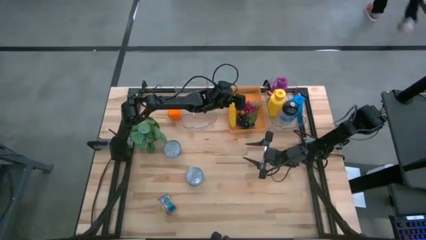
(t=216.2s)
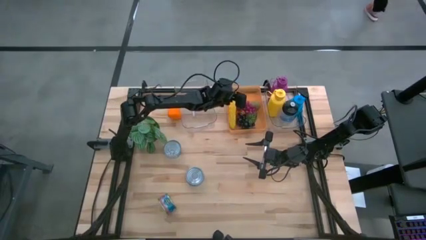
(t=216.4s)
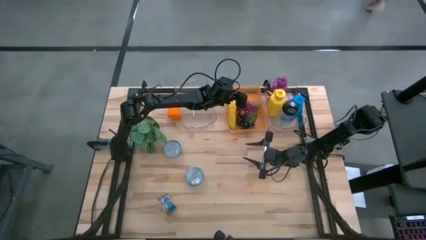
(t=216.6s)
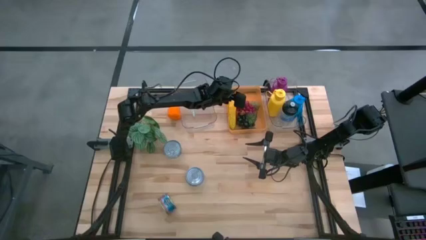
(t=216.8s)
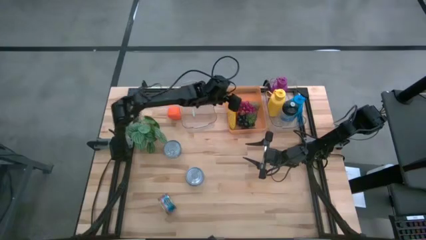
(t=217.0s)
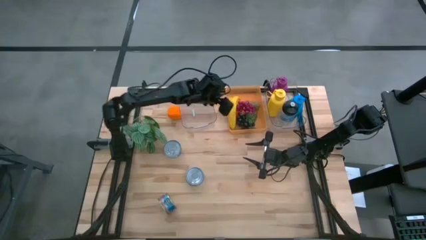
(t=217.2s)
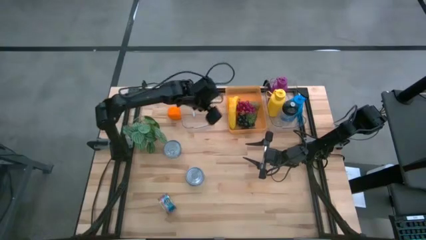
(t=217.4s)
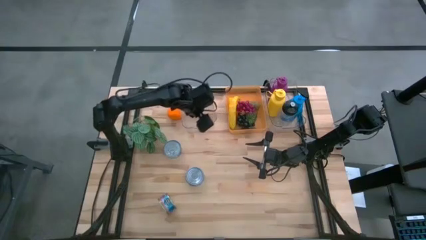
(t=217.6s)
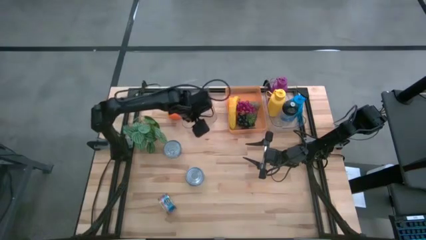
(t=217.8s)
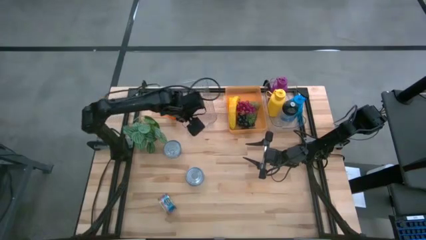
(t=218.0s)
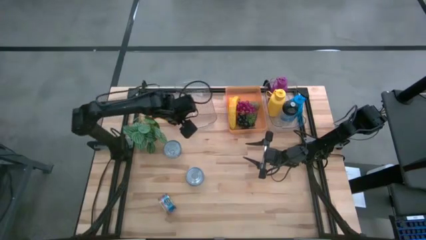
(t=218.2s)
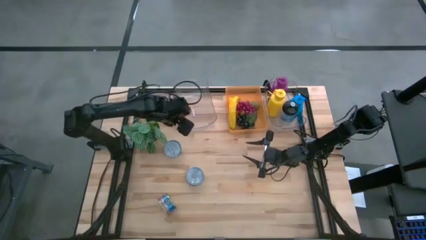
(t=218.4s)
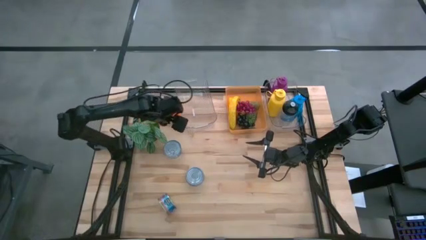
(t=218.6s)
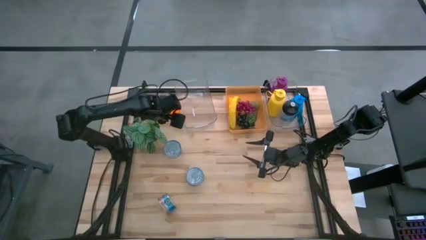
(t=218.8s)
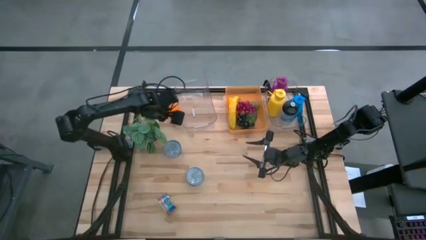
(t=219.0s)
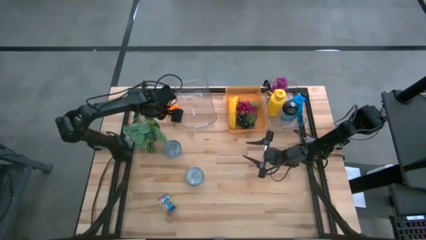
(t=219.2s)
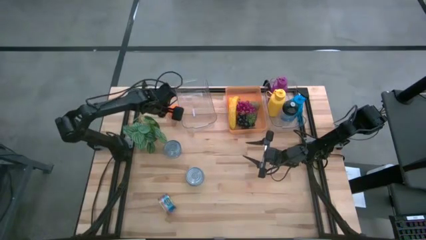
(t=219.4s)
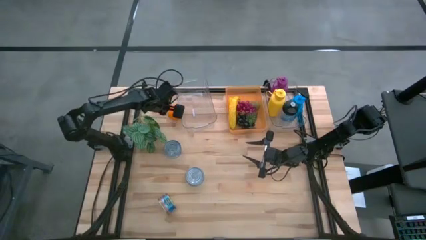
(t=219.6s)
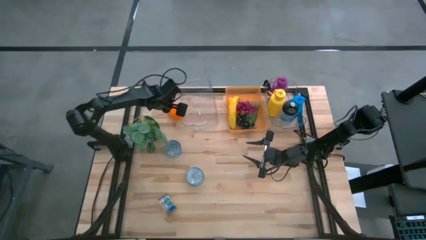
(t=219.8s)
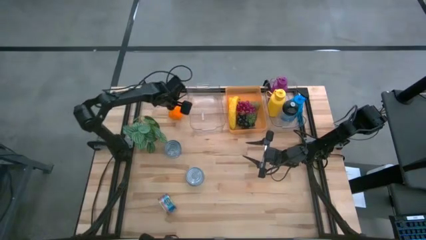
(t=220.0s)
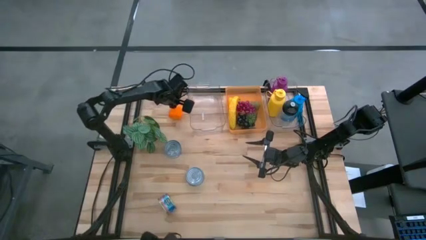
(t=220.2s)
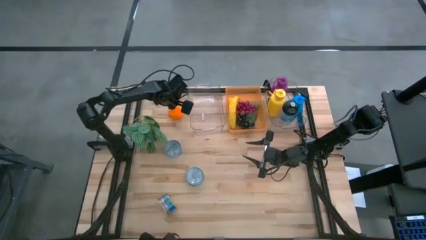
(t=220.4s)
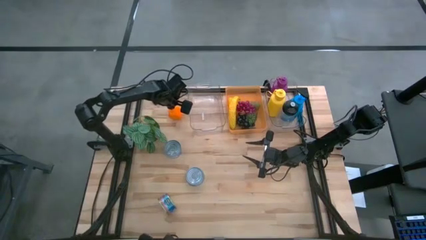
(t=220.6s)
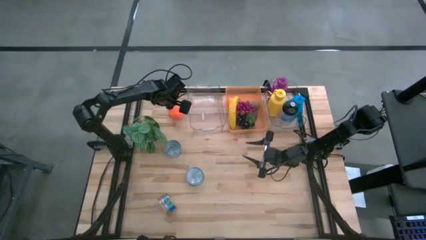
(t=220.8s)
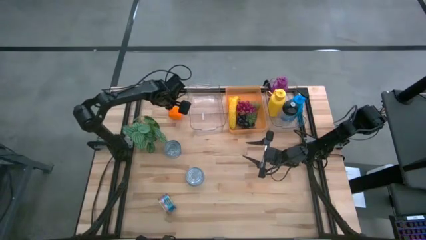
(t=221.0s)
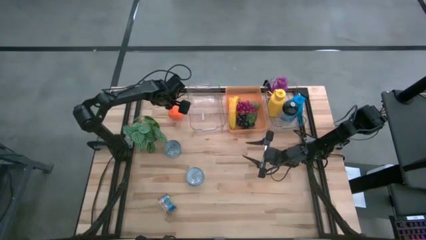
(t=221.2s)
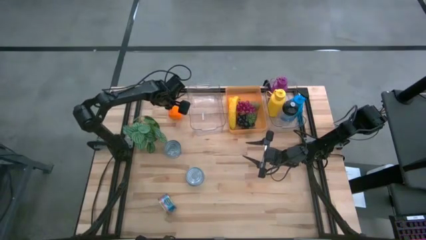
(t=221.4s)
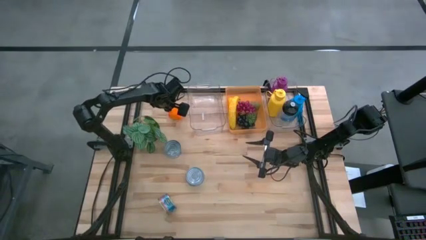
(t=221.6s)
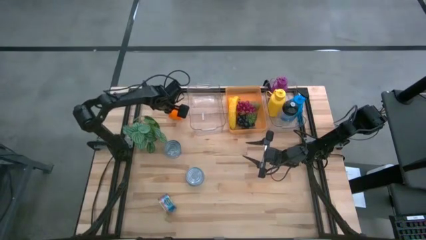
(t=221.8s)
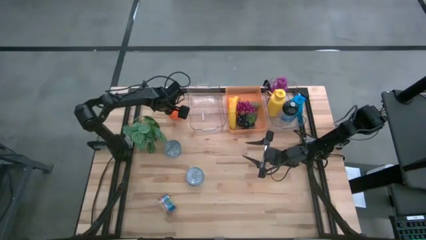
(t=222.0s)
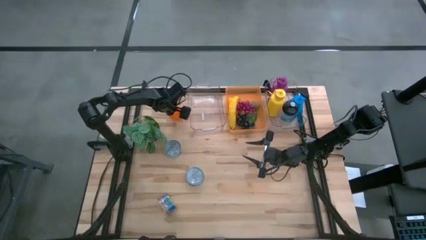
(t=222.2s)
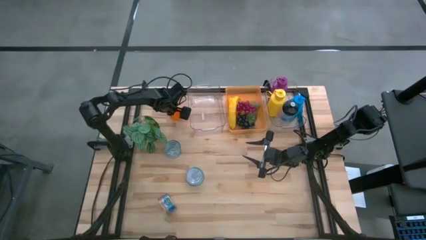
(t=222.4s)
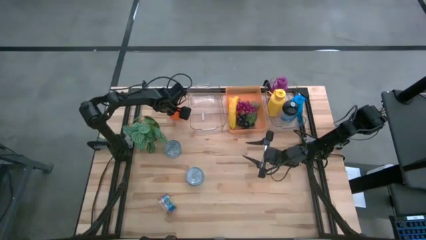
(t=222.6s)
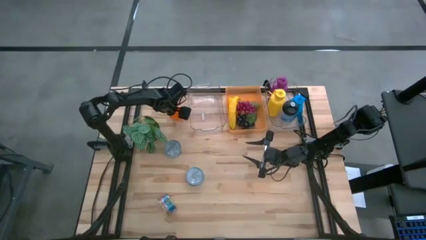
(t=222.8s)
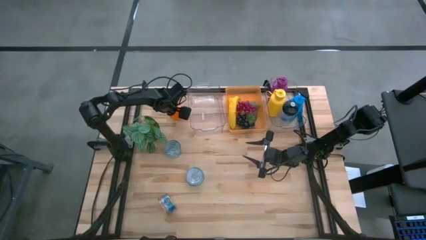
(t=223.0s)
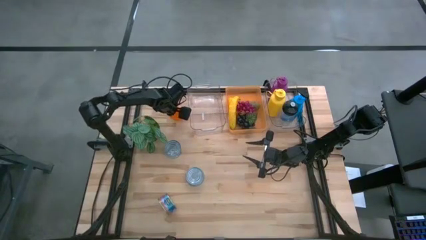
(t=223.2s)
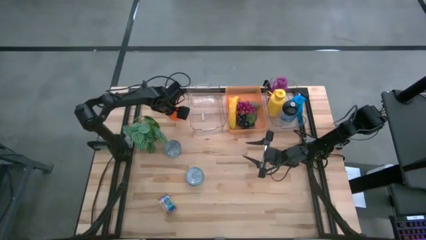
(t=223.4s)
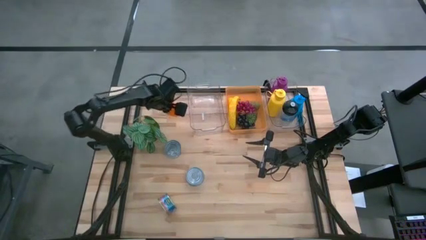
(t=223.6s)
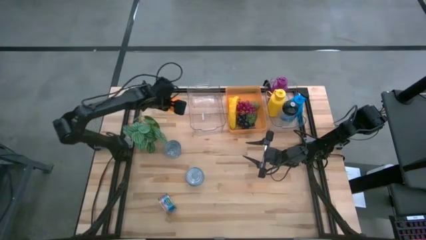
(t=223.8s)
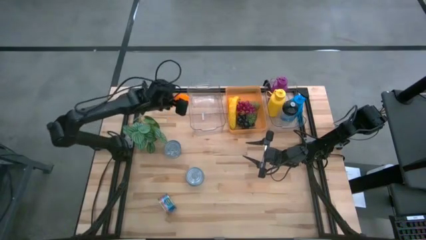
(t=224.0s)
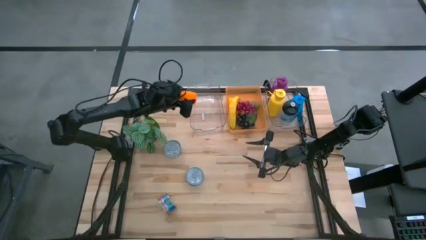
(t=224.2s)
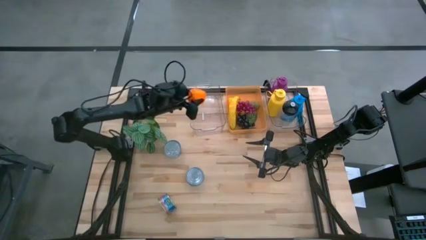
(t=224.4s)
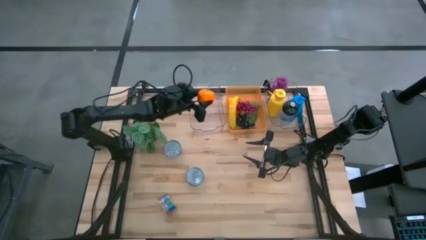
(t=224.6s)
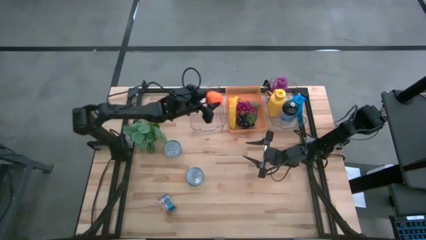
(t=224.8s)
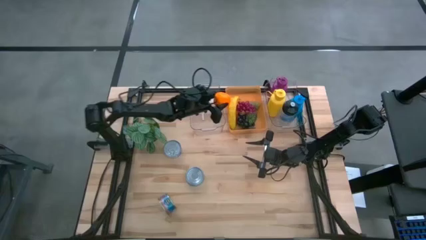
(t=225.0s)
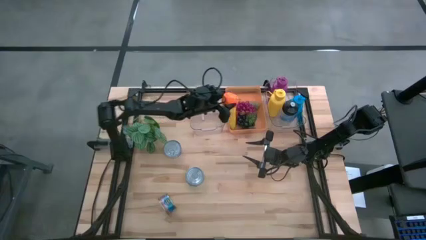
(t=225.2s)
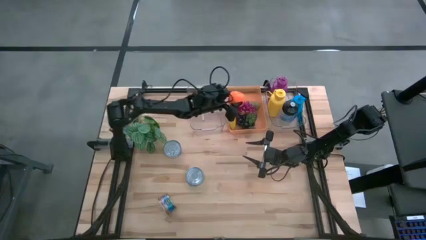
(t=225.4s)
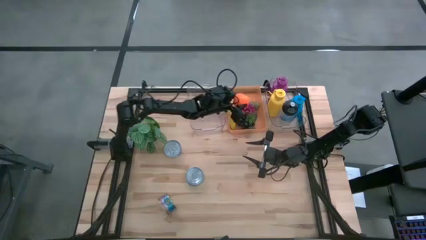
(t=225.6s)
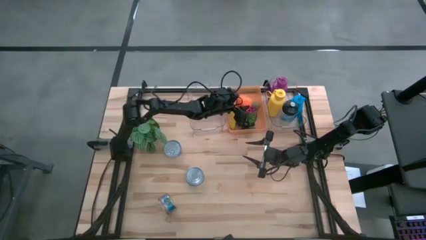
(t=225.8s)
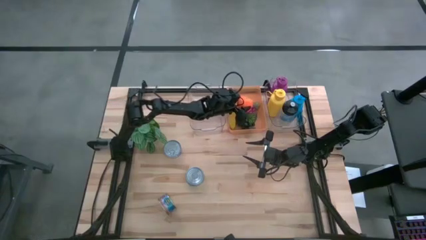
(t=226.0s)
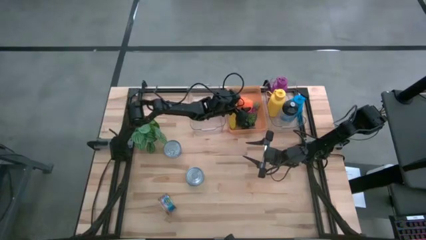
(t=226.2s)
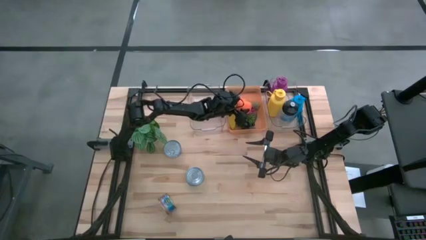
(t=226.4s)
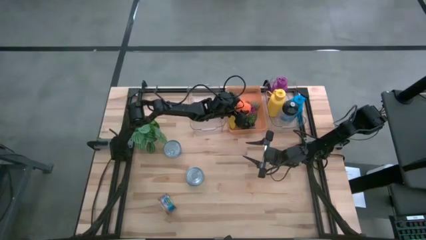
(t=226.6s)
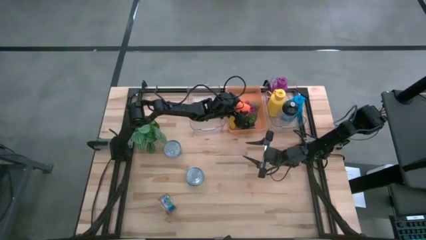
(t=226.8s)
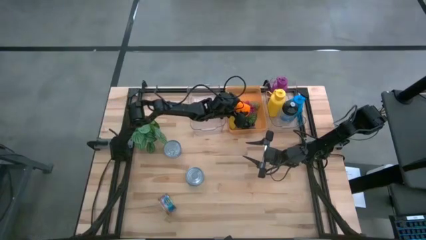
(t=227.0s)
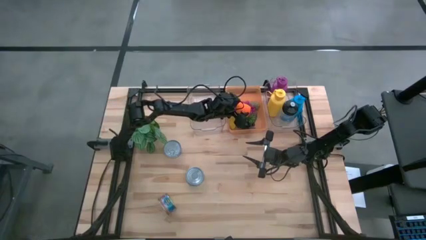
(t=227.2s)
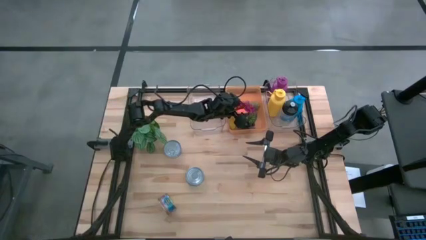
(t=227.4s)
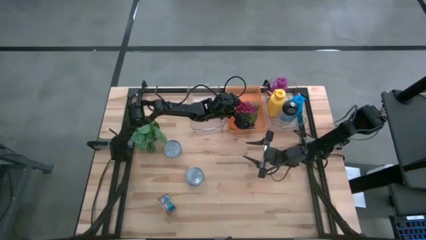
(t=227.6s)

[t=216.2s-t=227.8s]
Task: Pick & Place Food Item
Put the orange into the orange bin

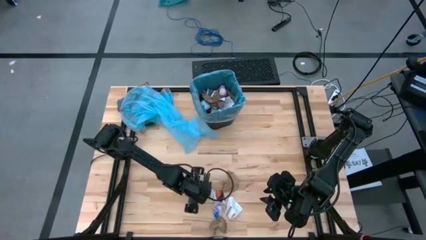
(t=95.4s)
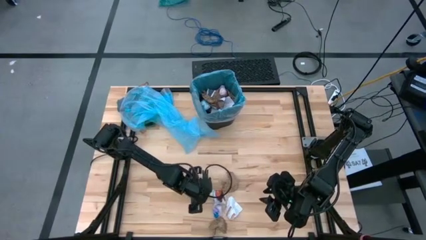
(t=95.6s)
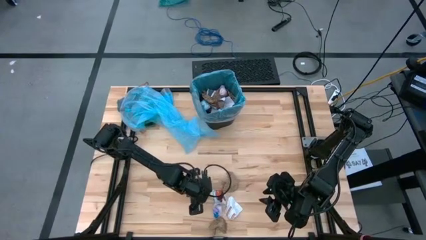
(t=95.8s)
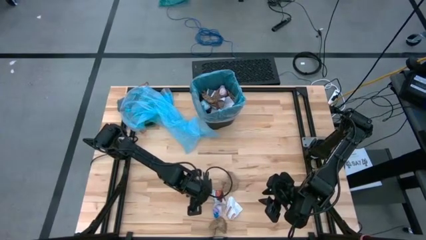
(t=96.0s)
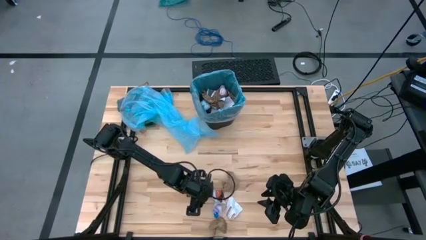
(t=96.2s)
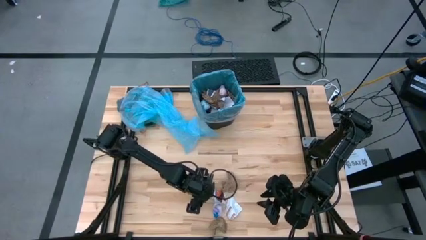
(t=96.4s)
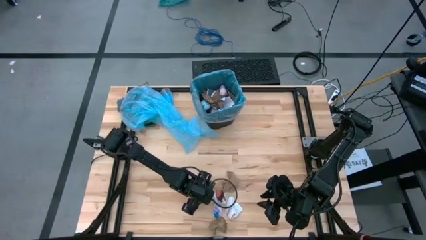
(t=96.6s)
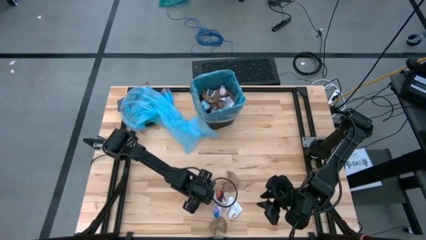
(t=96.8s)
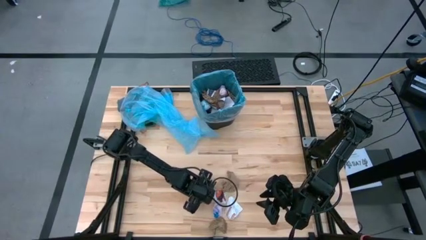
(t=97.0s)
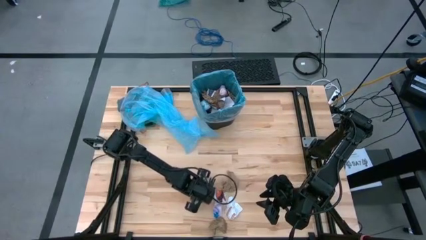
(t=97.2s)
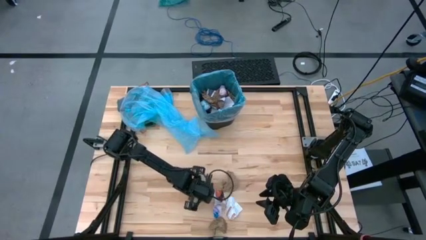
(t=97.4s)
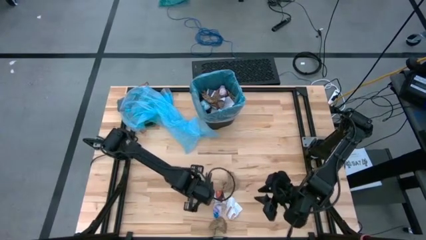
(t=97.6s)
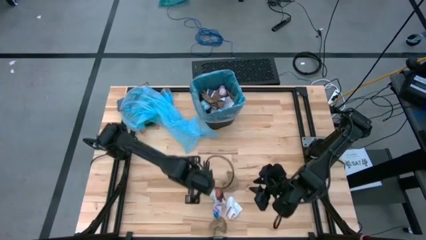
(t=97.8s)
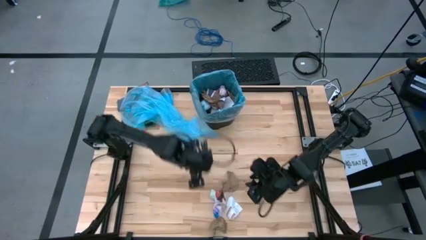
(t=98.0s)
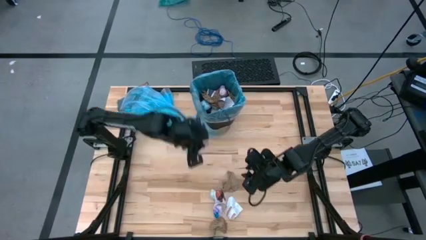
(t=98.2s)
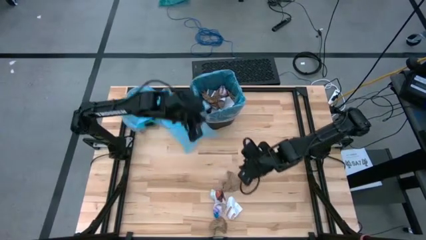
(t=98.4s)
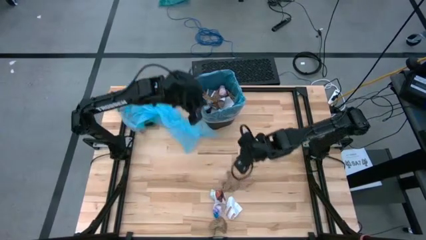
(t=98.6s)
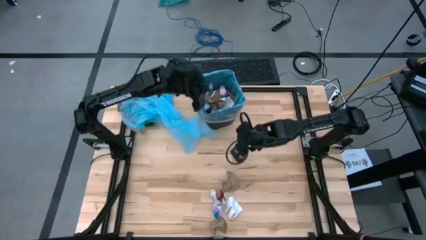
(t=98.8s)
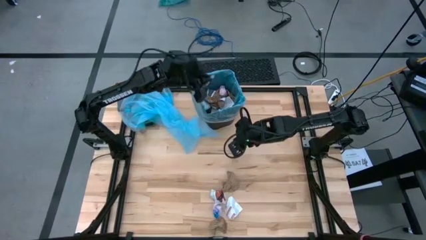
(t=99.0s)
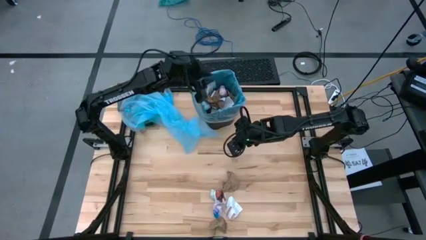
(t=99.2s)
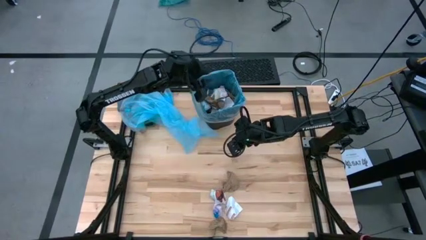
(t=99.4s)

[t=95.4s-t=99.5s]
Task: place trash/remove bag and relplace
Put the red paper into the trash bin
